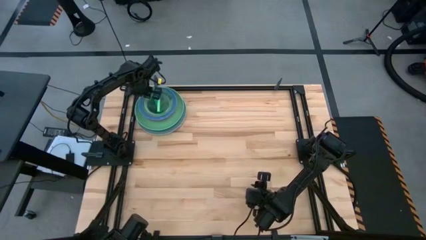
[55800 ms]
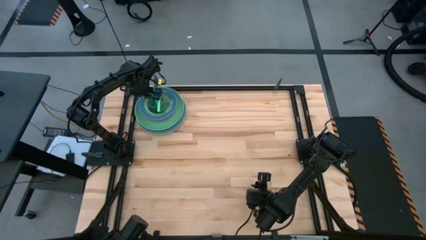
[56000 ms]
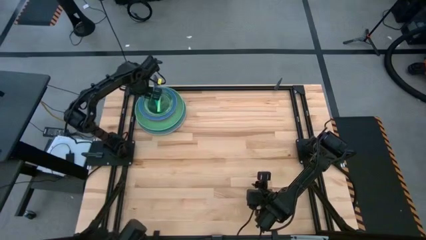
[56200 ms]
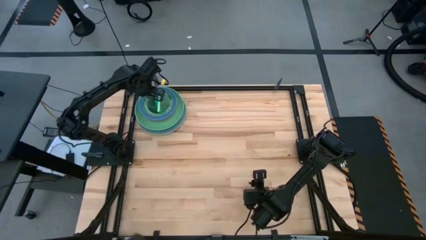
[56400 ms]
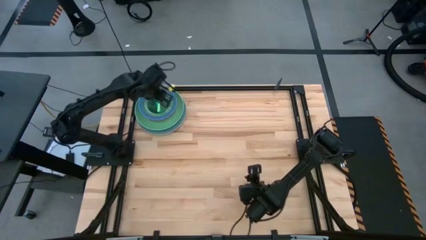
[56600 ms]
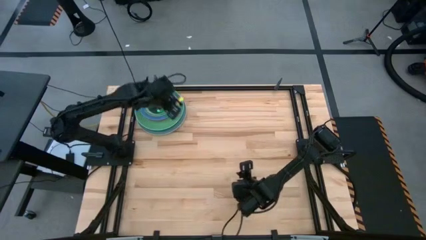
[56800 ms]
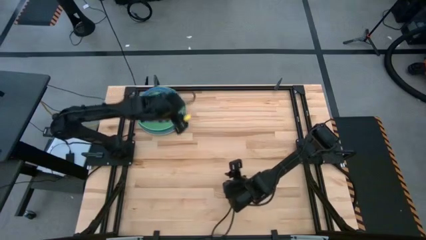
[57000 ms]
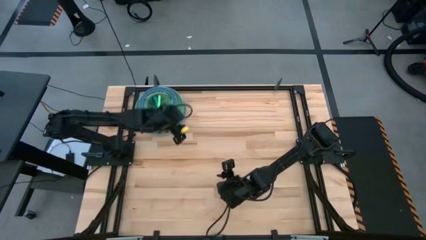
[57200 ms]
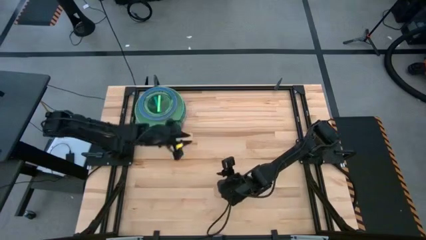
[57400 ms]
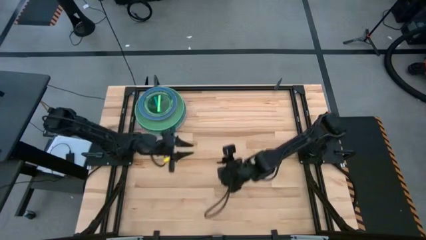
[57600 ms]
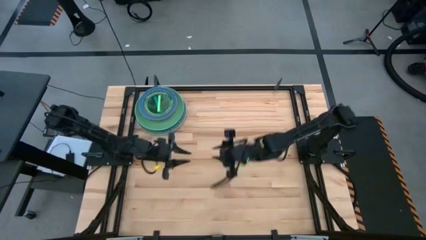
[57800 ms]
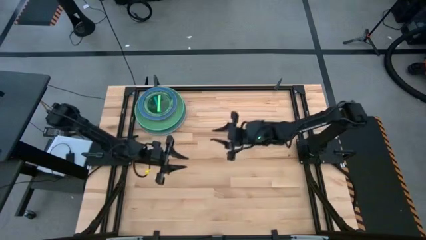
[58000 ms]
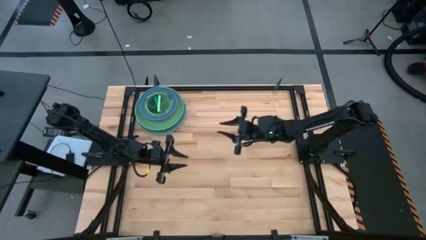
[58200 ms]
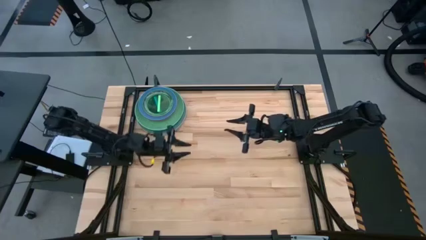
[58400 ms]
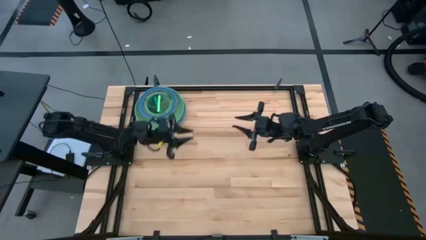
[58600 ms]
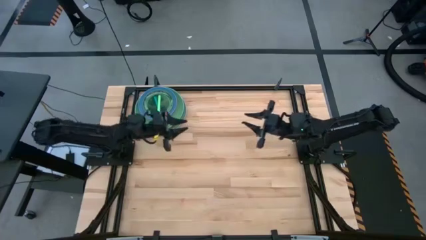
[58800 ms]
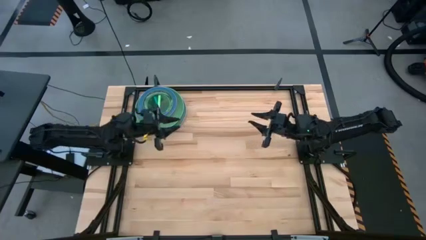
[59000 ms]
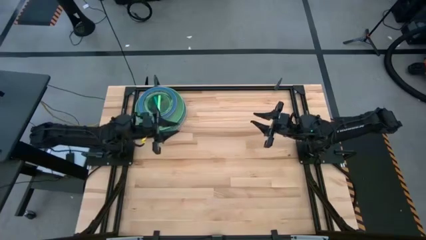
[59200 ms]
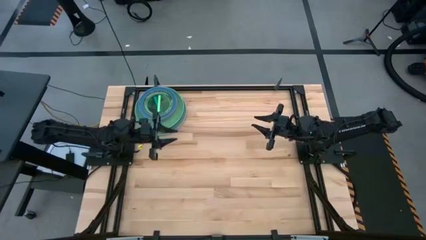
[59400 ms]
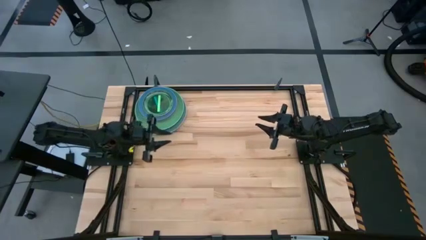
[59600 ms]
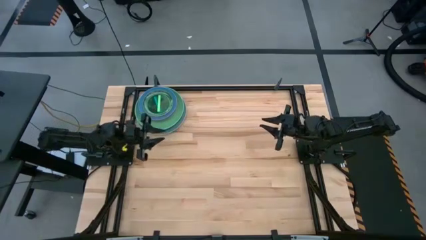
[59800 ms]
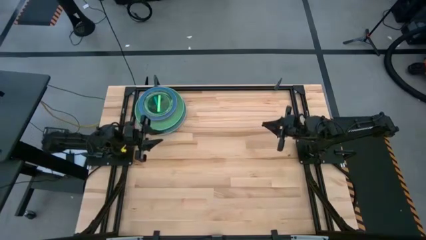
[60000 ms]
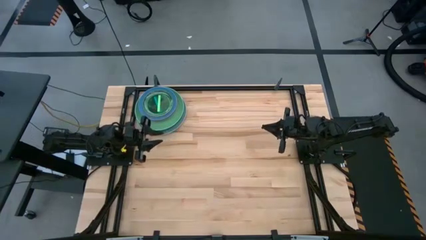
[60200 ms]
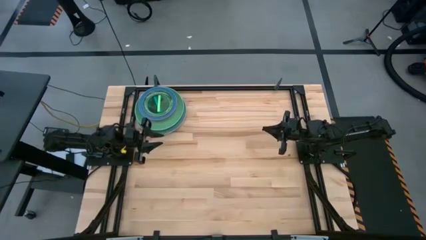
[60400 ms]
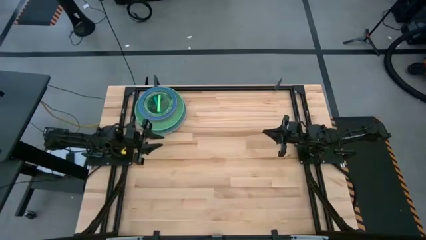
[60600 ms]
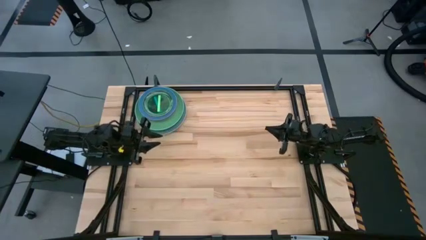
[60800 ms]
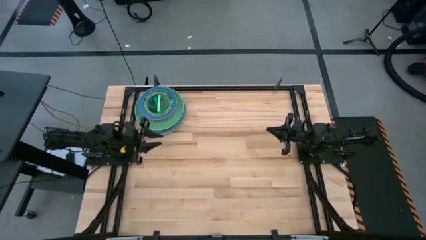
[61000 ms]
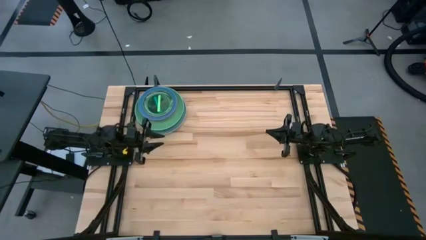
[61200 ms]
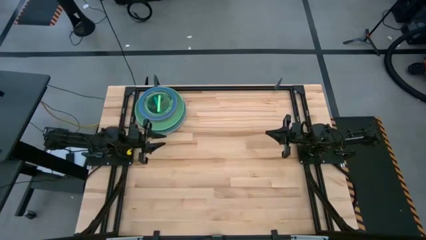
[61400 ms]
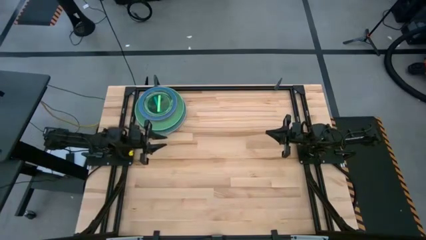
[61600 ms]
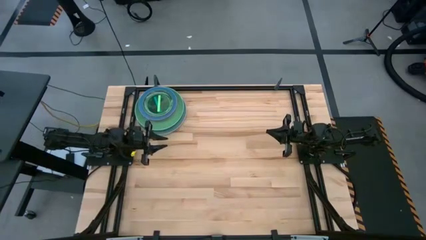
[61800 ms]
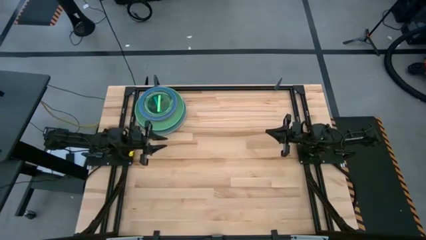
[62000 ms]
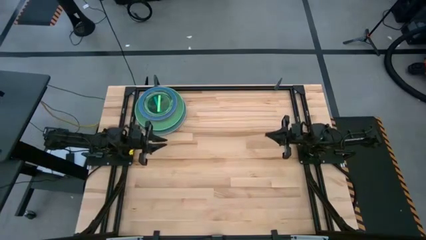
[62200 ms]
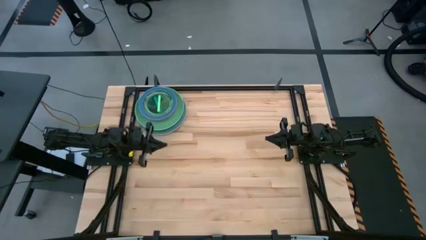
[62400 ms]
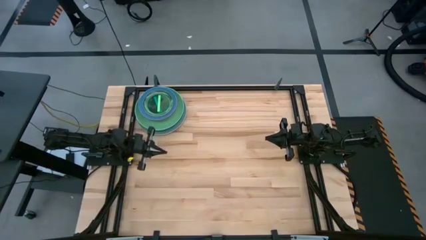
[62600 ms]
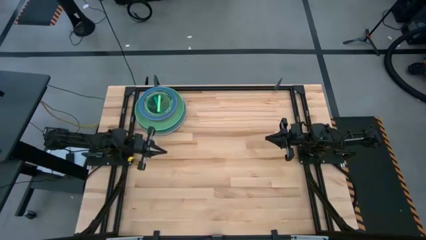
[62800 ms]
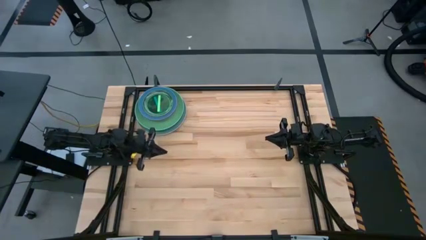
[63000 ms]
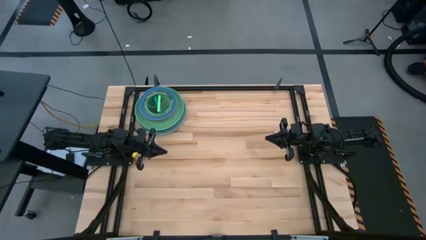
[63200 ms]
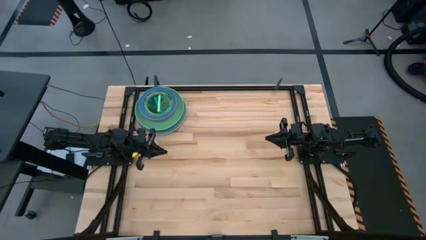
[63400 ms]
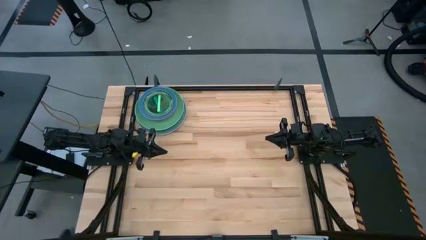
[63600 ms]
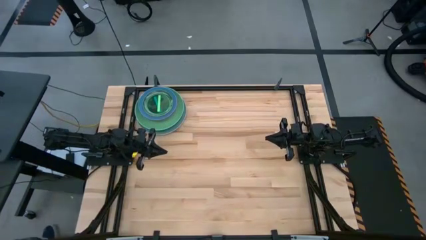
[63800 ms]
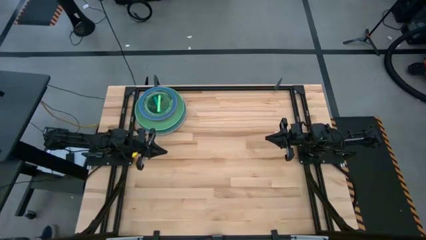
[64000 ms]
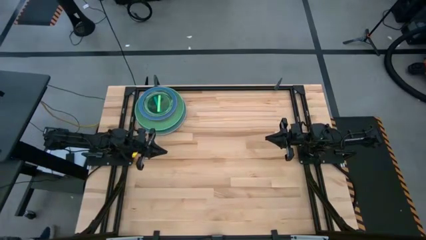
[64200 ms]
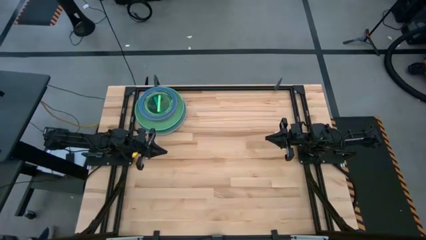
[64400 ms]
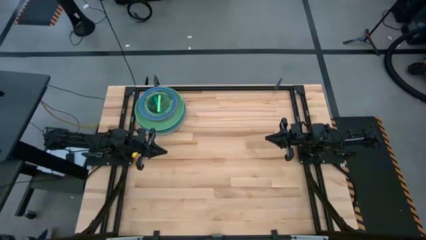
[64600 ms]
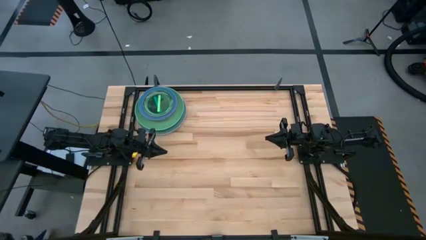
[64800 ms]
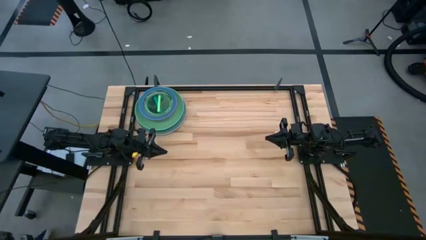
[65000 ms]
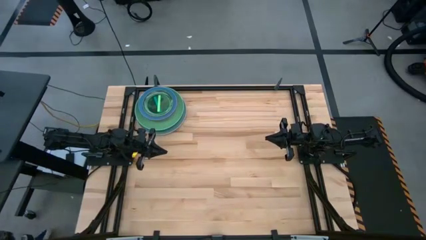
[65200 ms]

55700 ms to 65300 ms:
Task: Stack plastic plates
Return to Home Position

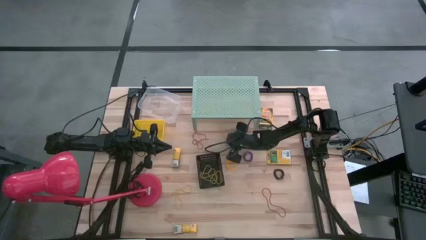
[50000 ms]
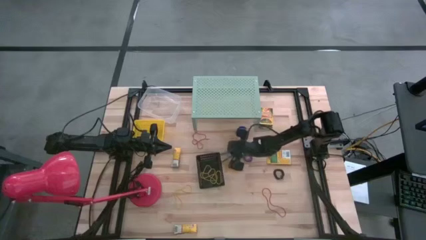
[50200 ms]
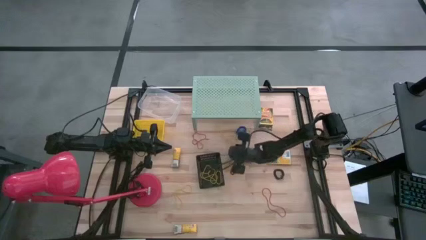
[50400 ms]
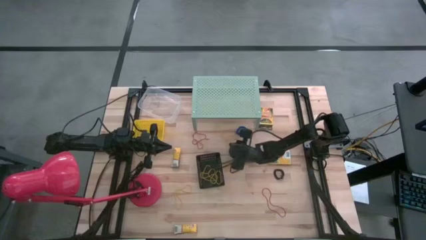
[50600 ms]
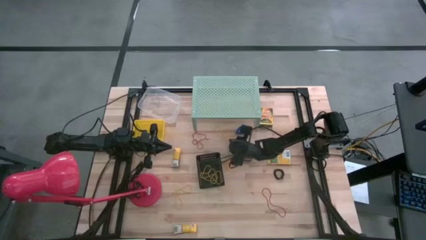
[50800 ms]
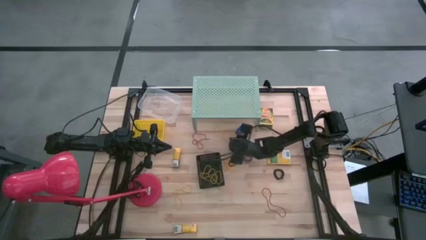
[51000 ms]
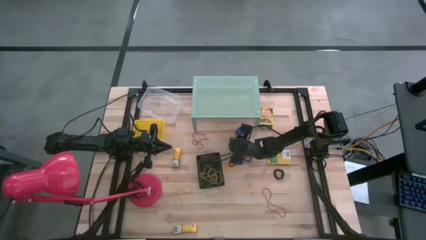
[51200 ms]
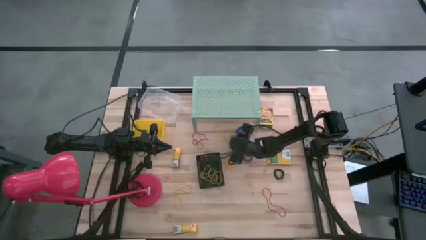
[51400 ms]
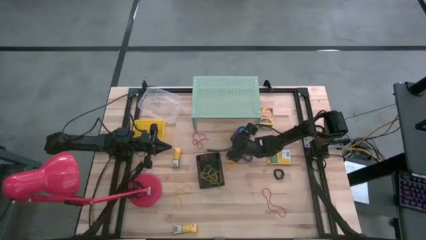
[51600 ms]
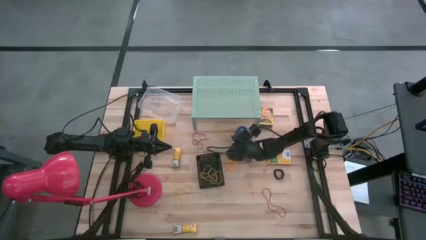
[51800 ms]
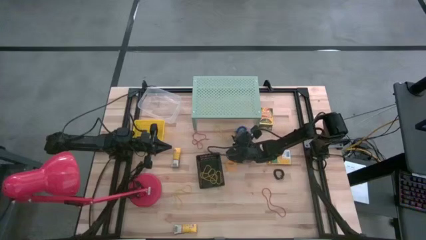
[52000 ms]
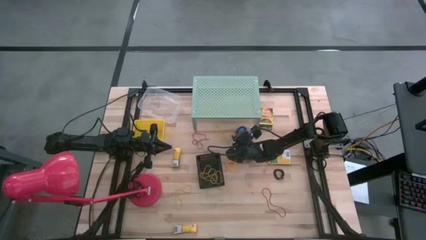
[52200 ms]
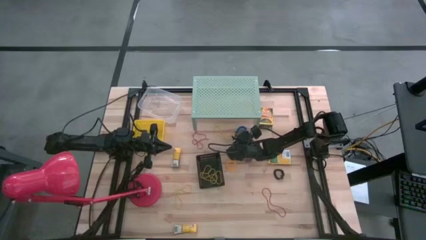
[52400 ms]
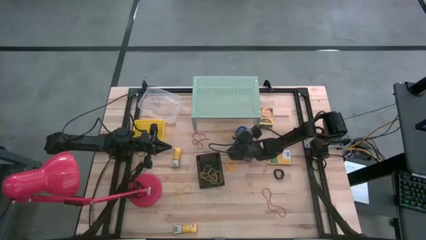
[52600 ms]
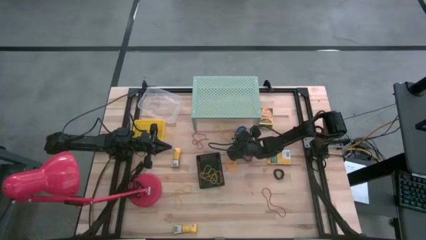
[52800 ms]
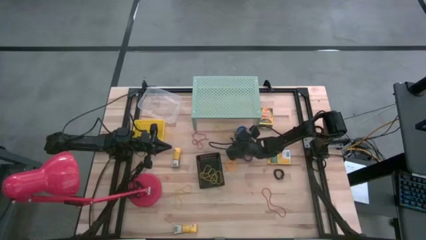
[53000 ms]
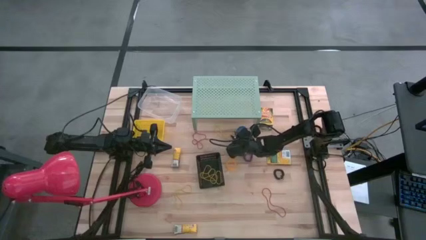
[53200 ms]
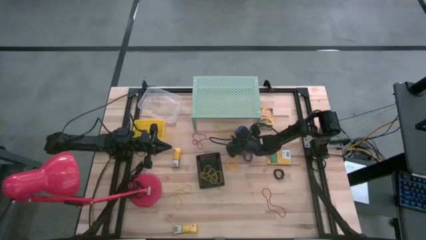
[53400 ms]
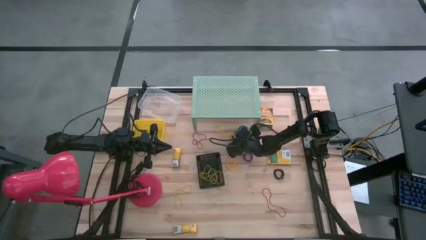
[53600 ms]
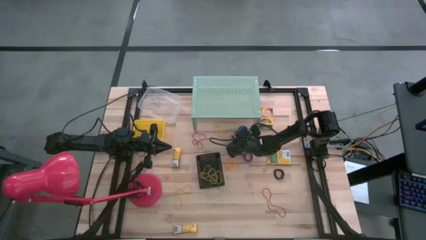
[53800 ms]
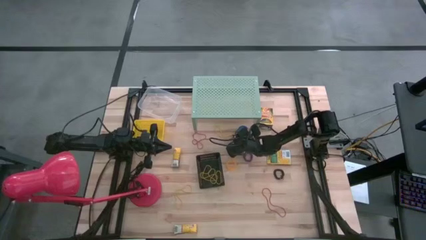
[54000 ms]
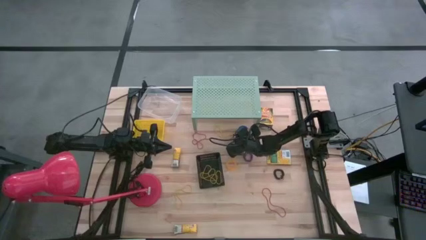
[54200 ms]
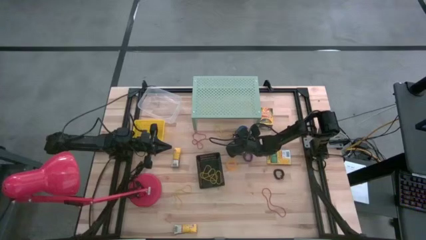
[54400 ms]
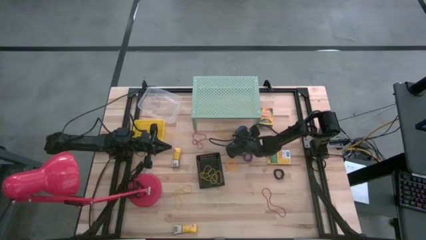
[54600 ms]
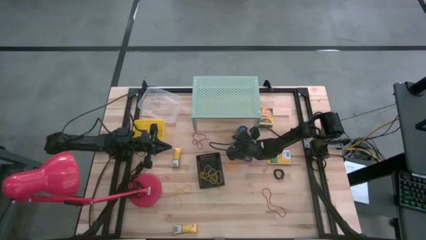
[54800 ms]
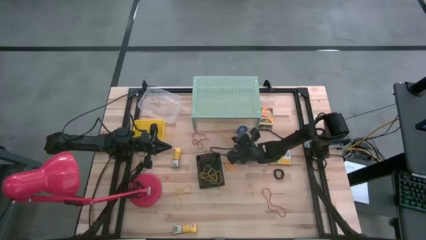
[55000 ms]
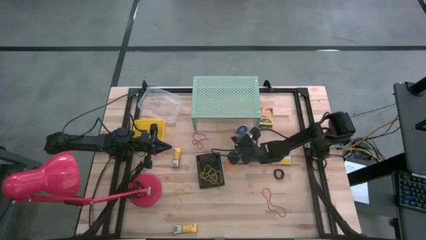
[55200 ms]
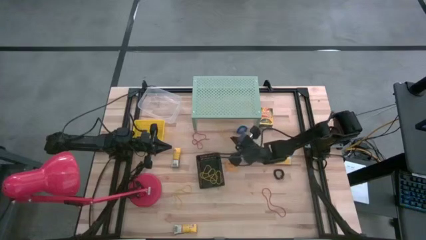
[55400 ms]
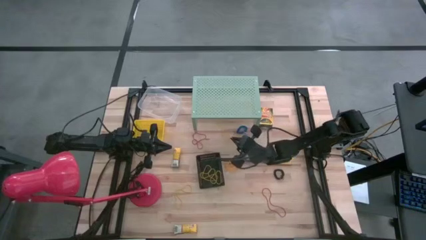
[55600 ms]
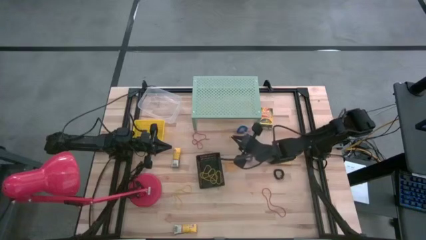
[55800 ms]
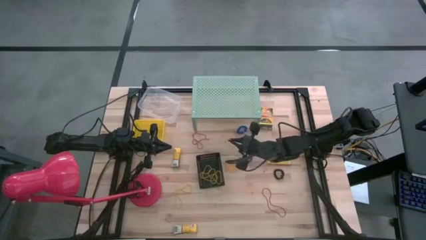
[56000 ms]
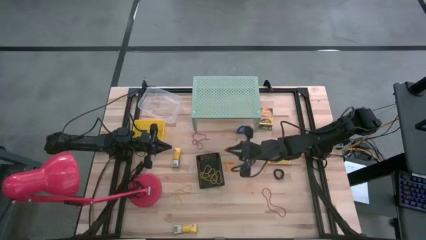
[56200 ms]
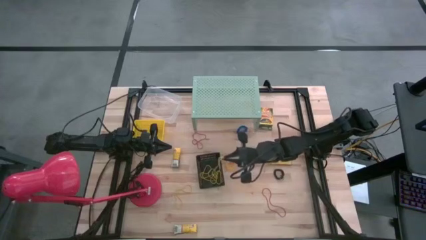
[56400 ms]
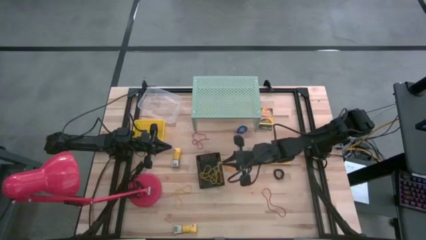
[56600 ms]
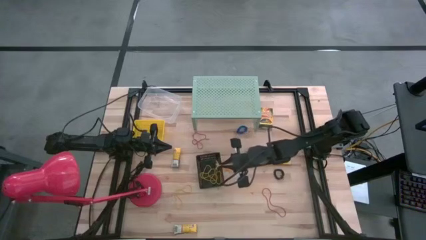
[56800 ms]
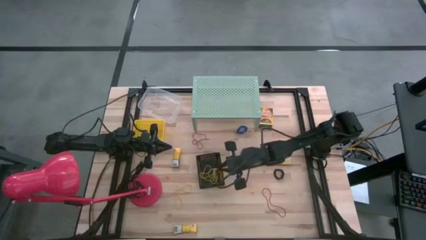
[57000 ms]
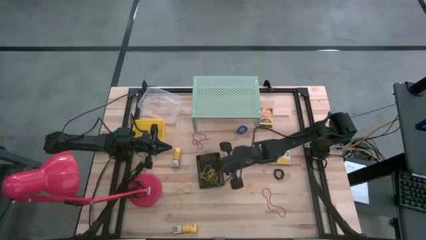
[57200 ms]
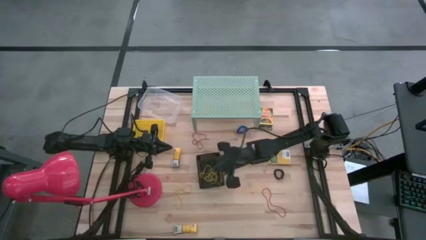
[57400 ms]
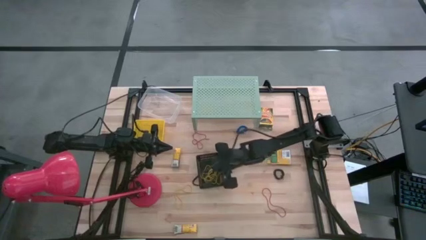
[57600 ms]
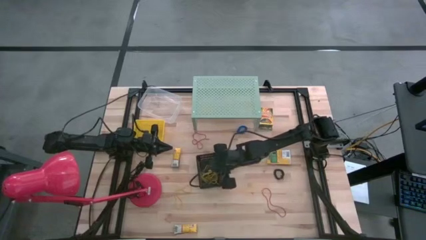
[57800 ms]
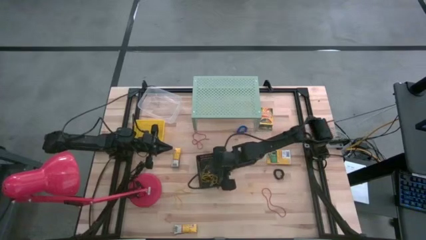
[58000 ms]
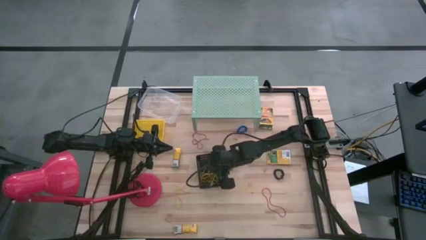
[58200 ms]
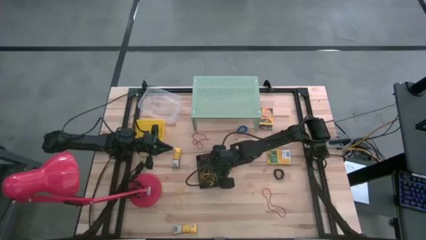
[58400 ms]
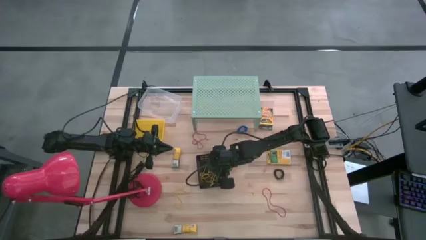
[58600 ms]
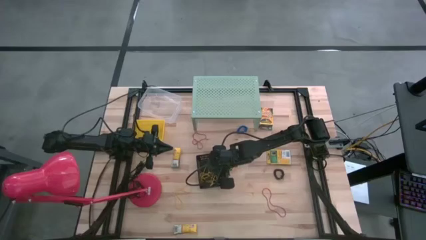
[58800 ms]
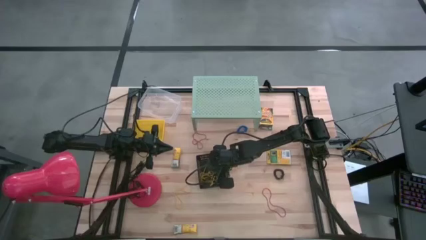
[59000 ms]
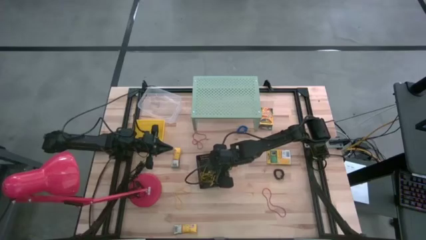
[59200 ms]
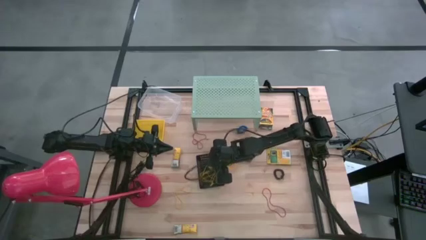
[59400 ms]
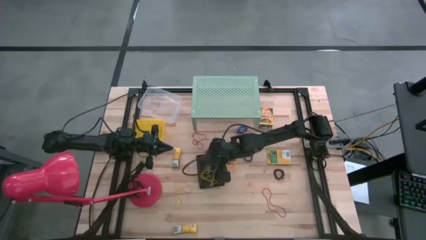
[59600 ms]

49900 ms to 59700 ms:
Task: Pick & Place Office Desk Supplies
Put the yellow rubber band into the black bin
